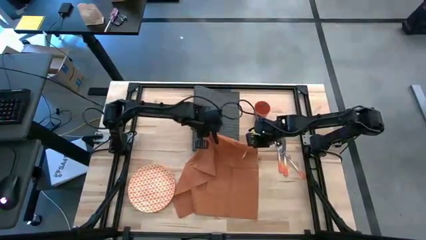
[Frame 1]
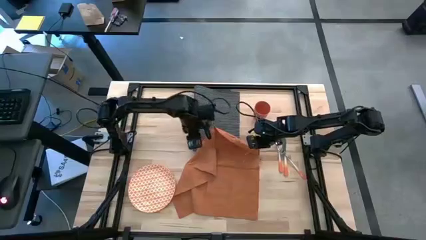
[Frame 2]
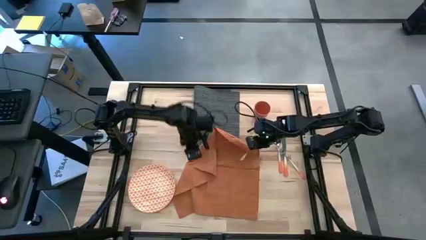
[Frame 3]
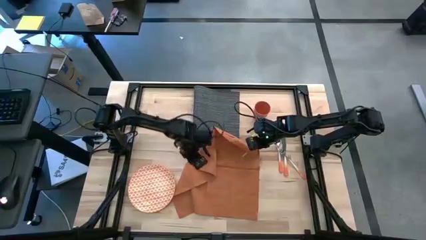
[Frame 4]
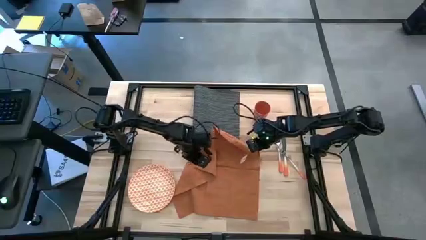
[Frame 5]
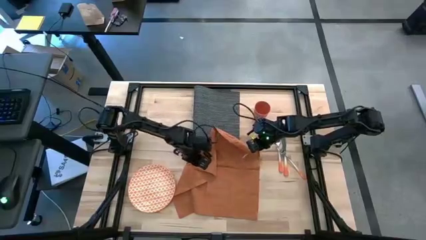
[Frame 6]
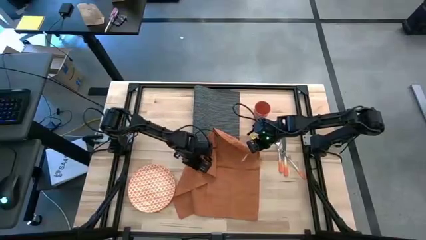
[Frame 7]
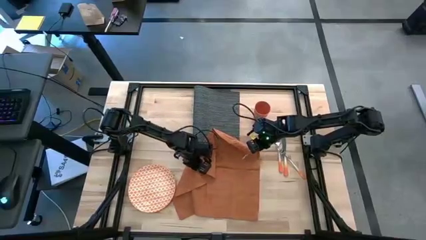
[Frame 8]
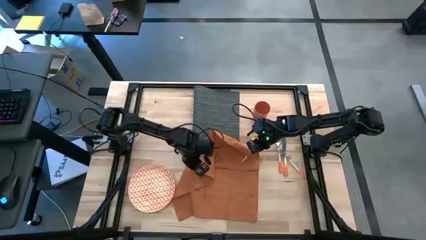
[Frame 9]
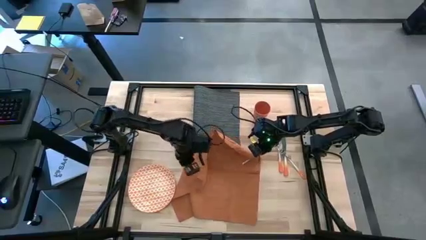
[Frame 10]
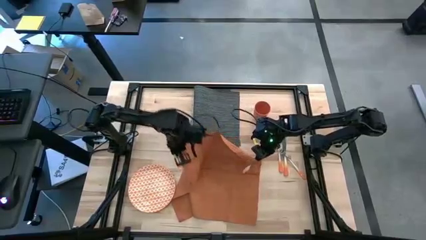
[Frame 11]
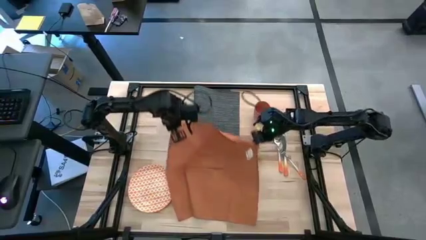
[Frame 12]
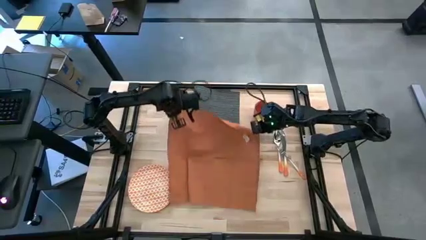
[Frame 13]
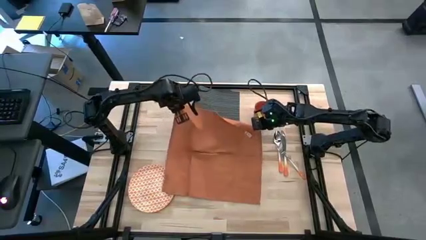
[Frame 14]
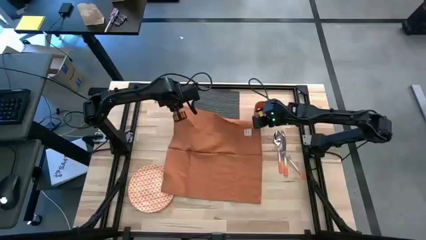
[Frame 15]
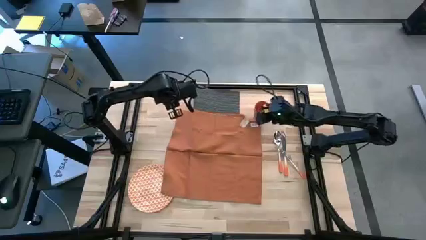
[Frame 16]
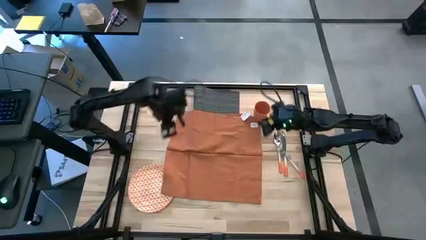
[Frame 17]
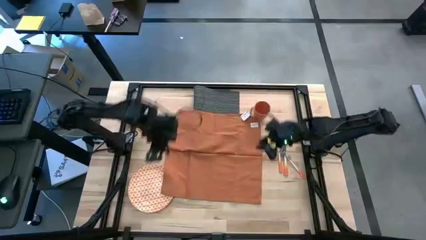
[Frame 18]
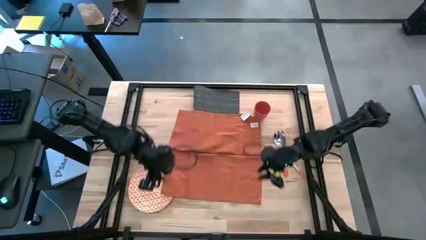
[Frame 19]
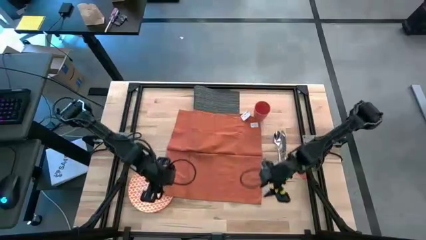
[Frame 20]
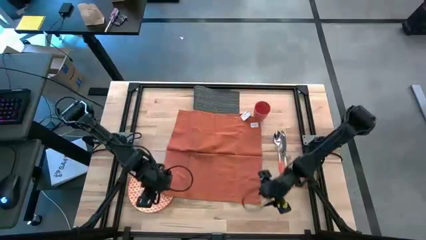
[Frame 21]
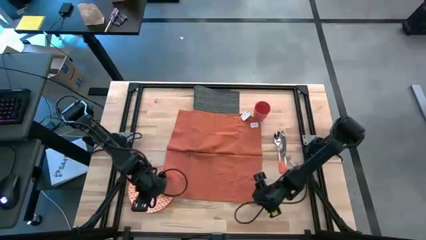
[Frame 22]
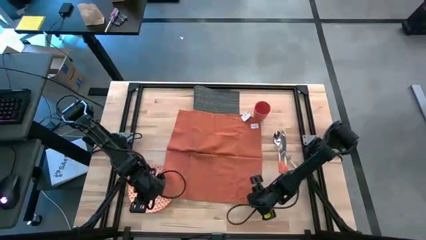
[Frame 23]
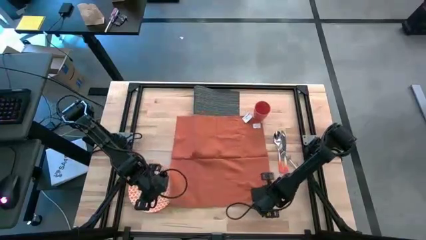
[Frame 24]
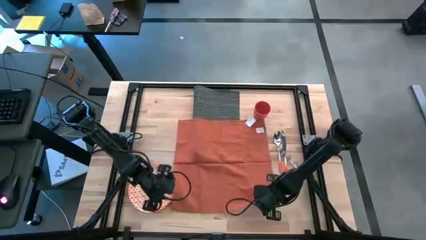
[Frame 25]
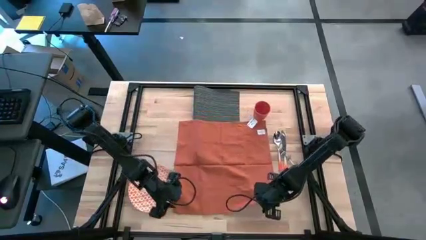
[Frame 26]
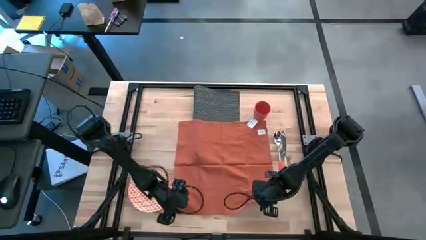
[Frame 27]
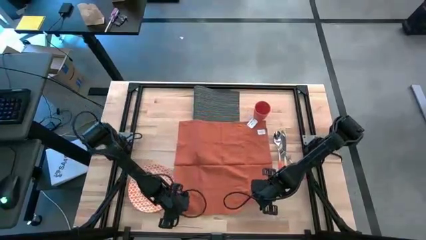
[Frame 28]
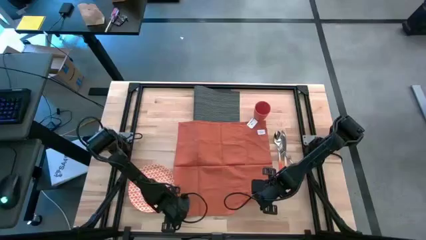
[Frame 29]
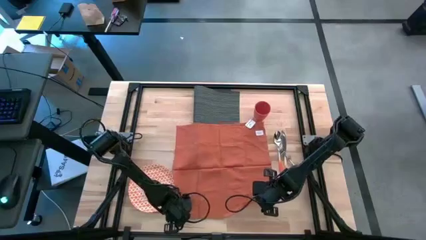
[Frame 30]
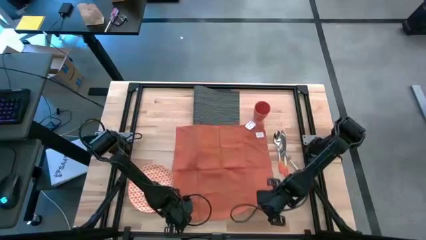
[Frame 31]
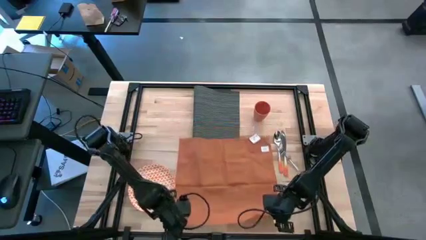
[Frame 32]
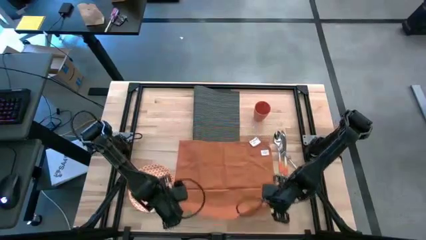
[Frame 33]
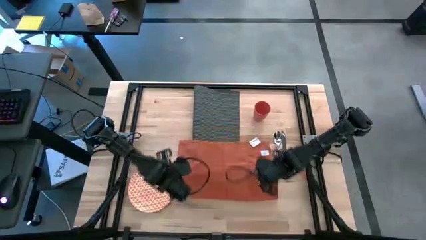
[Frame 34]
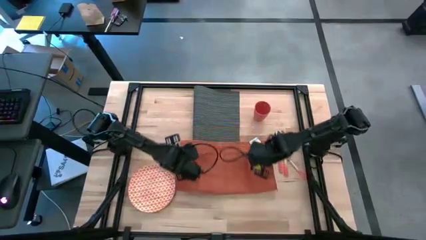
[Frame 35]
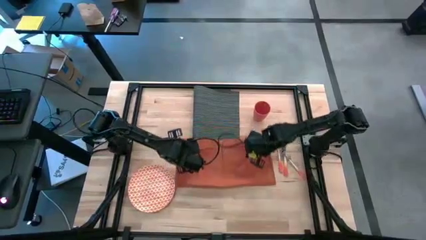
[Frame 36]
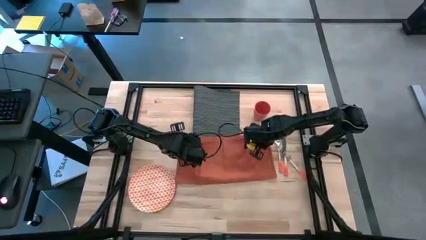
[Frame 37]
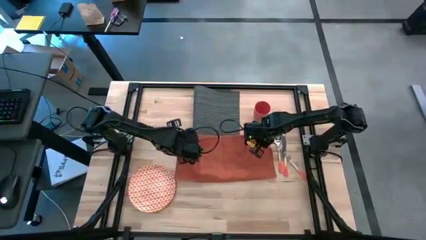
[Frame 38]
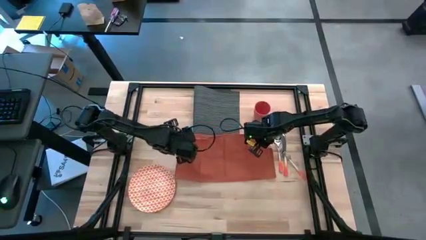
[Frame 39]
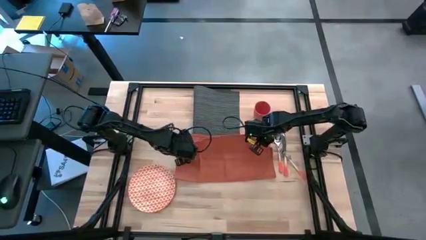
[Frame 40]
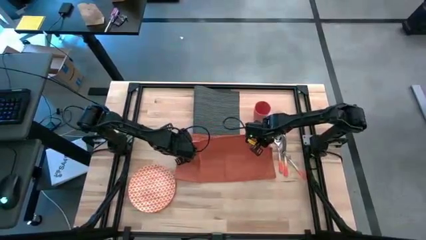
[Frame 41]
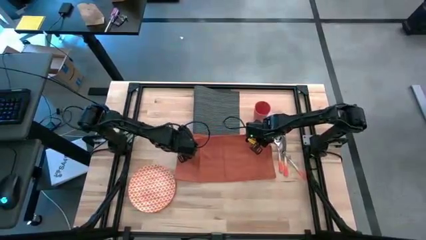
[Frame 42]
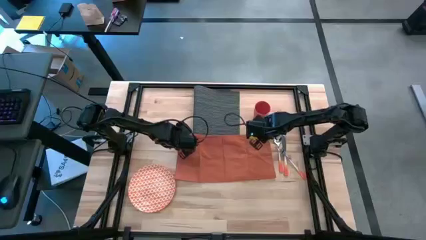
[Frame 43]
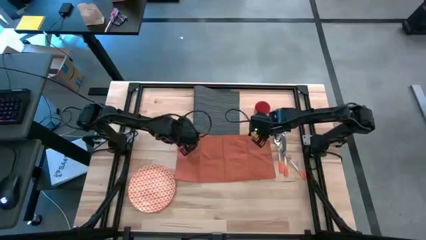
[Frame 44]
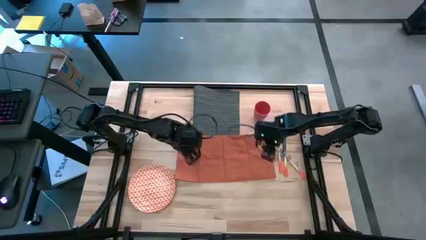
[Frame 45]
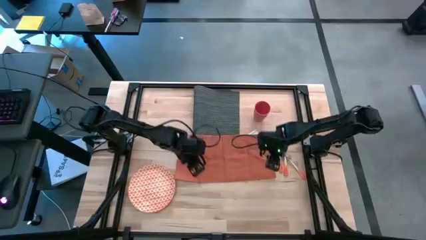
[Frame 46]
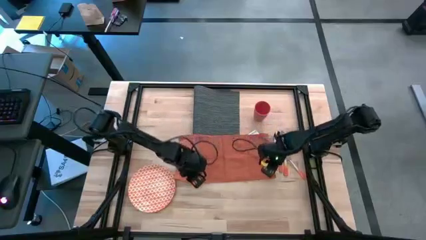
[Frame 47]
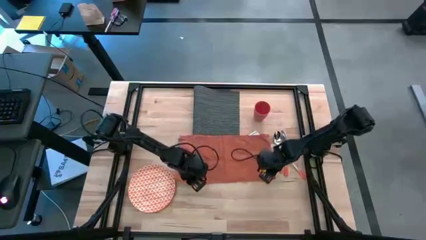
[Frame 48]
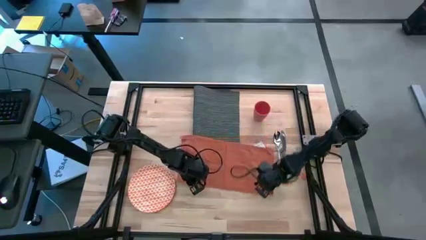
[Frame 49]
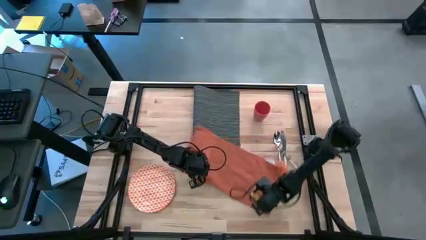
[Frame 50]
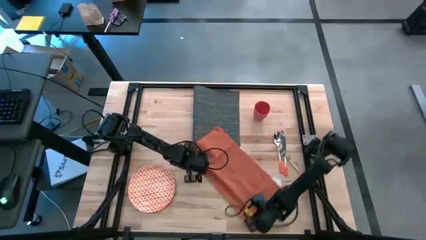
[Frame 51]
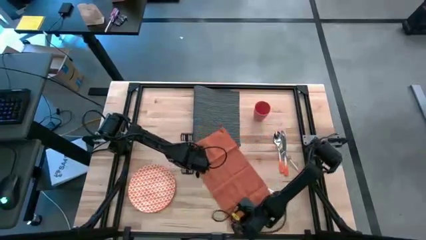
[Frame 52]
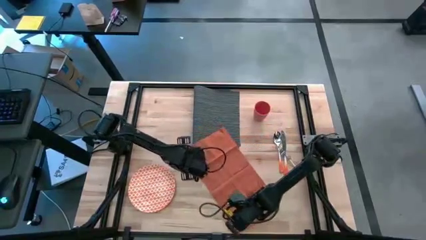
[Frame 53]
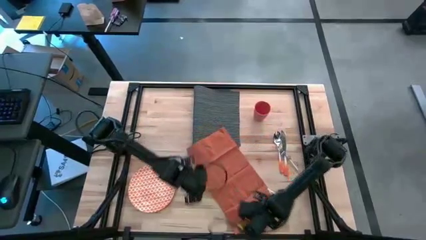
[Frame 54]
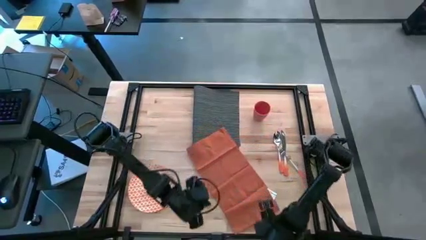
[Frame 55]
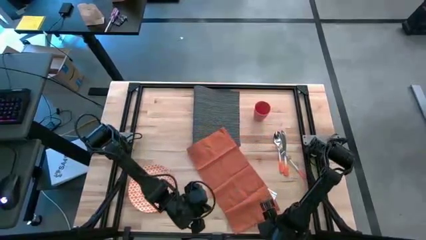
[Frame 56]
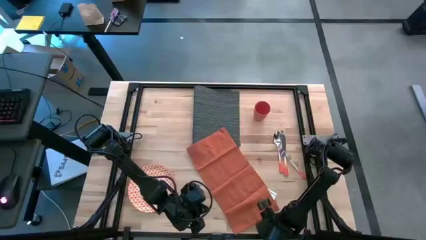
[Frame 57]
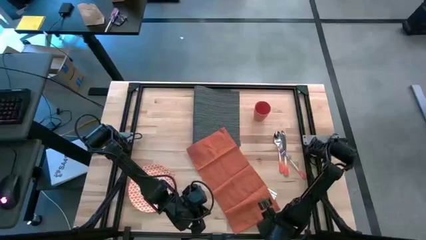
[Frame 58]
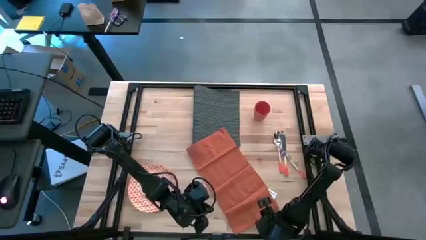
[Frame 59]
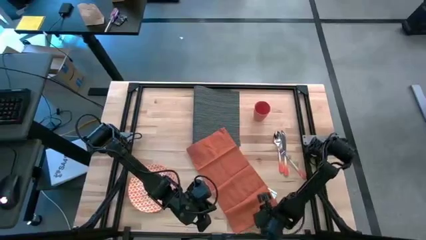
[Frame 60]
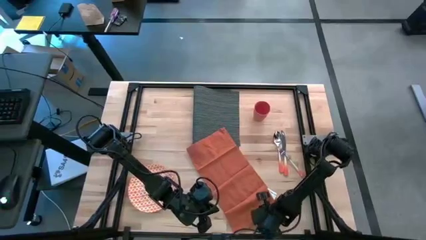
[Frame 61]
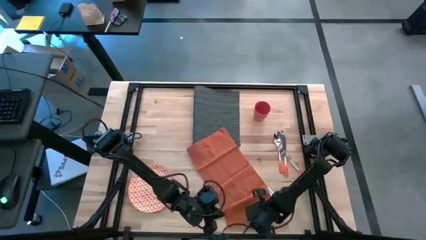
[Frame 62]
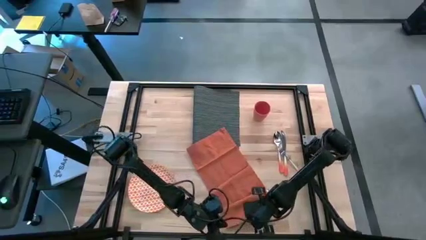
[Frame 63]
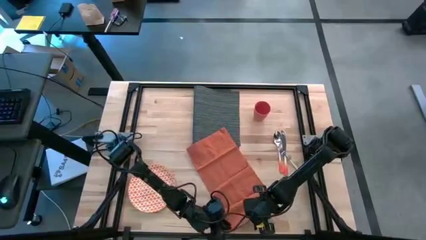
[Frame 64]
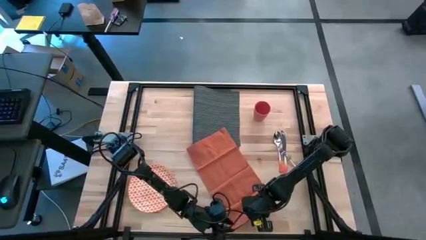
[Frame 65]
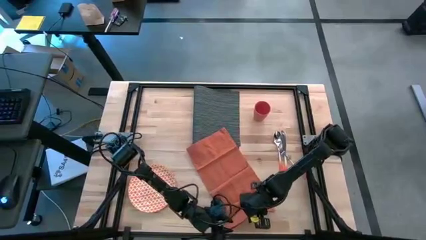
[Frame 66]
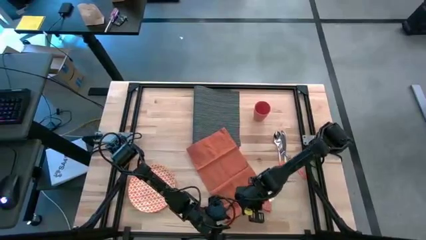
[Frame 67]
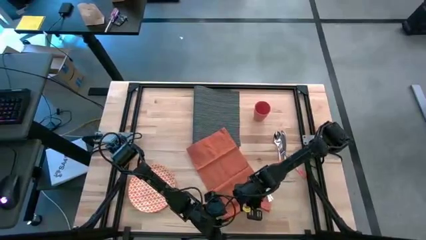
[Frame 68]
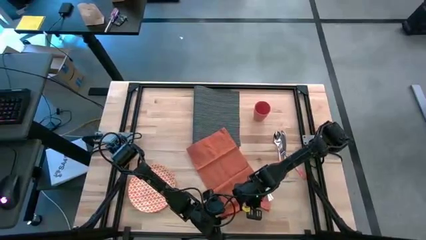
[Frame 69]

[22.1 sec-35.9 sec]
Task: Set table place
Fold the orange table napkin
